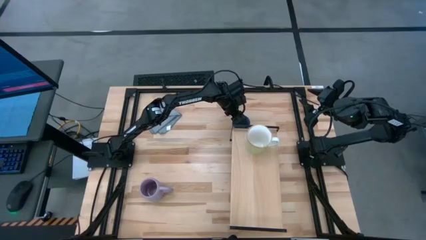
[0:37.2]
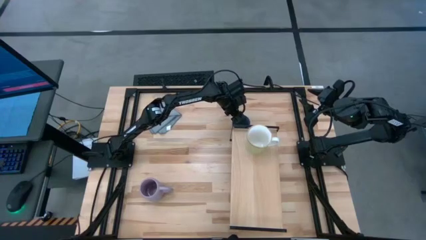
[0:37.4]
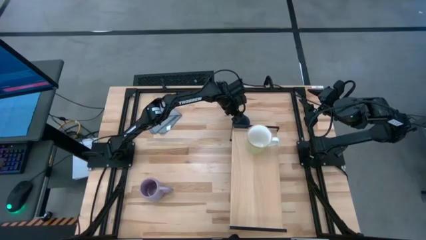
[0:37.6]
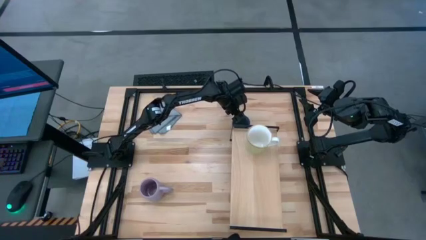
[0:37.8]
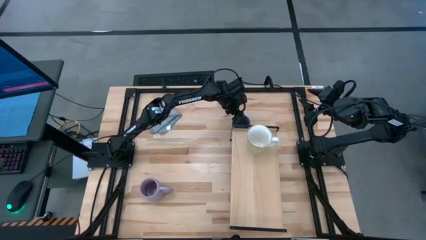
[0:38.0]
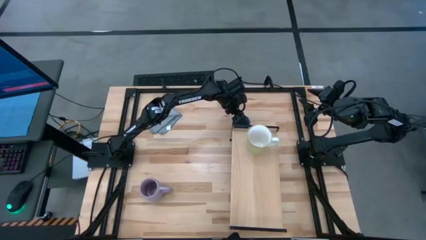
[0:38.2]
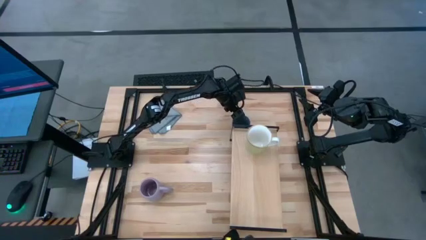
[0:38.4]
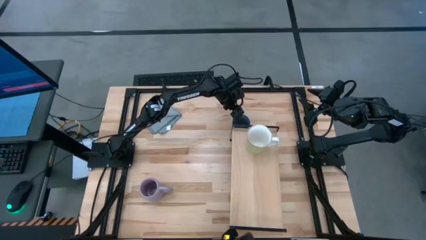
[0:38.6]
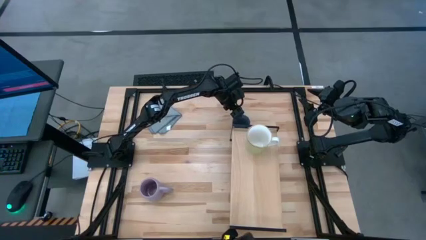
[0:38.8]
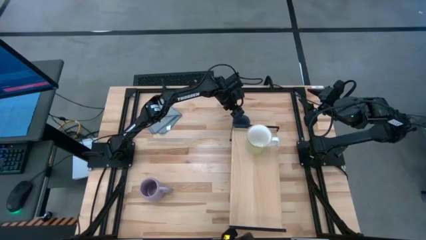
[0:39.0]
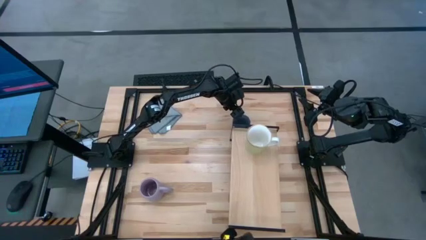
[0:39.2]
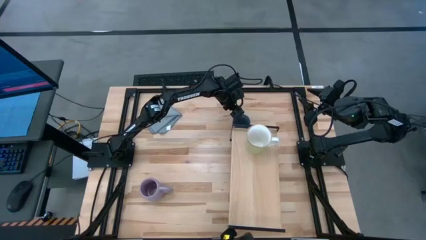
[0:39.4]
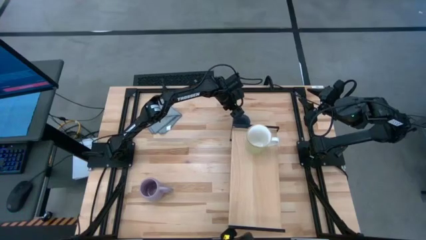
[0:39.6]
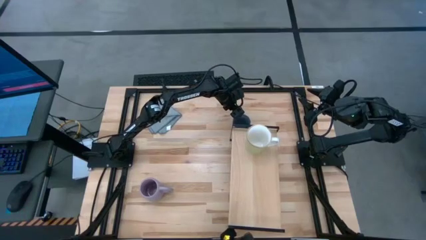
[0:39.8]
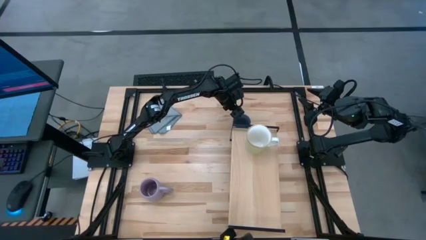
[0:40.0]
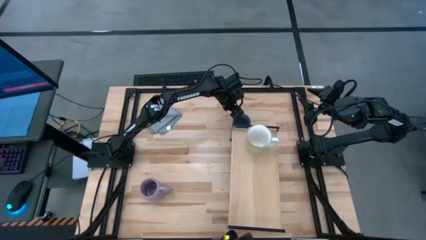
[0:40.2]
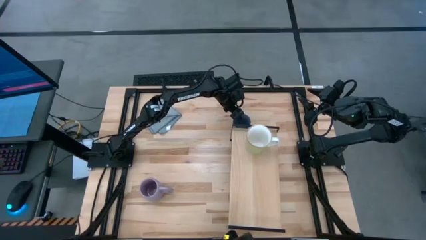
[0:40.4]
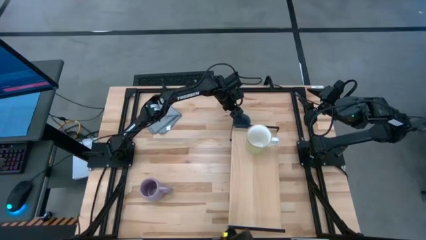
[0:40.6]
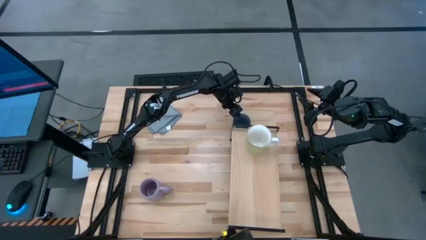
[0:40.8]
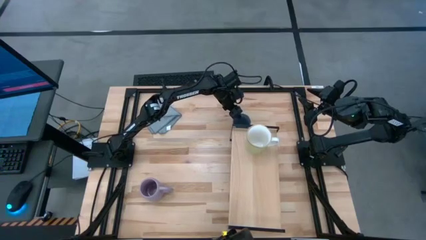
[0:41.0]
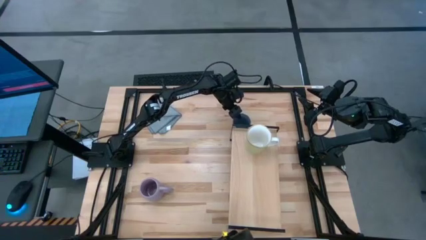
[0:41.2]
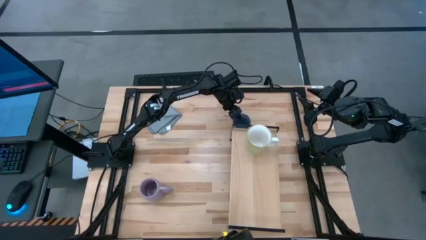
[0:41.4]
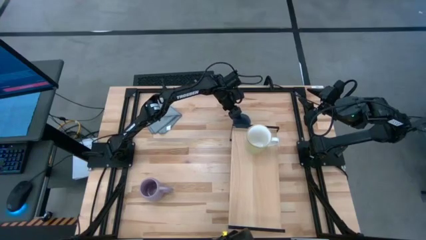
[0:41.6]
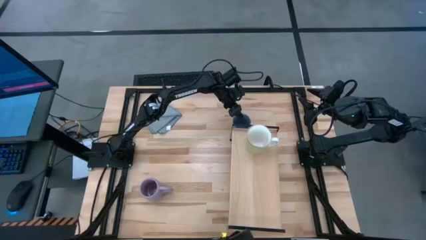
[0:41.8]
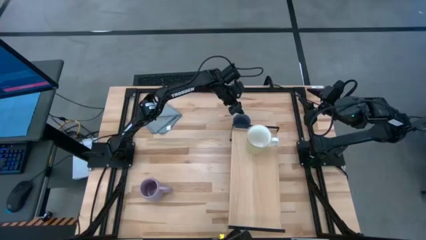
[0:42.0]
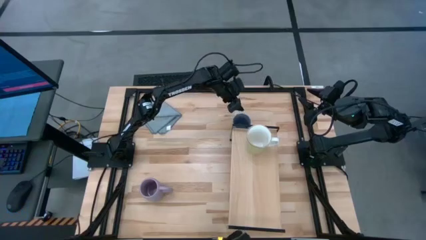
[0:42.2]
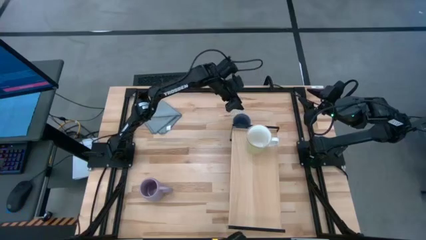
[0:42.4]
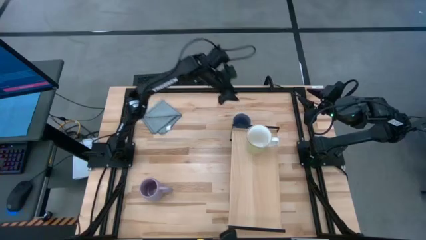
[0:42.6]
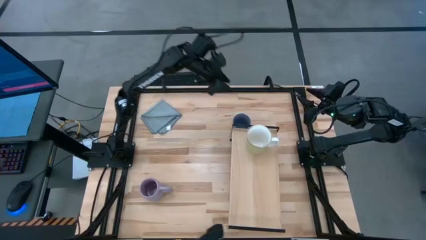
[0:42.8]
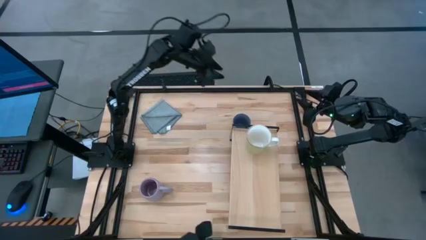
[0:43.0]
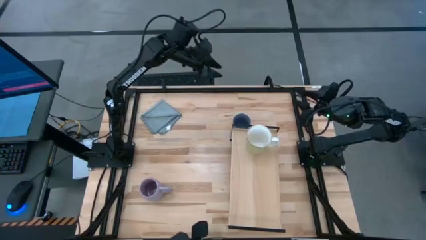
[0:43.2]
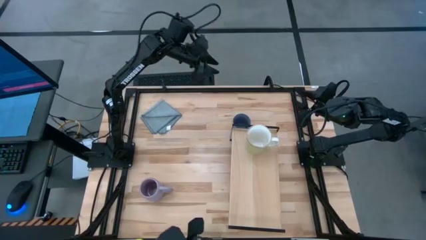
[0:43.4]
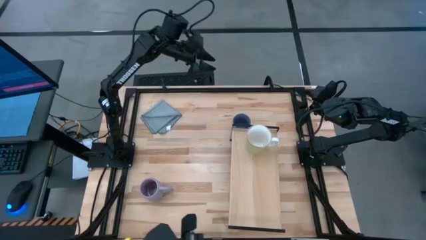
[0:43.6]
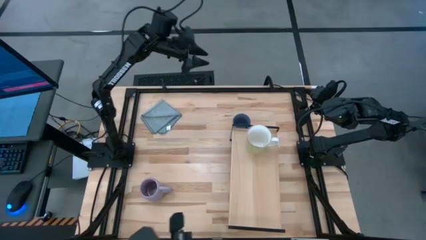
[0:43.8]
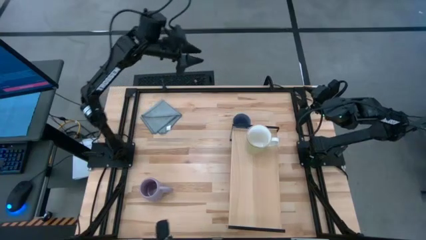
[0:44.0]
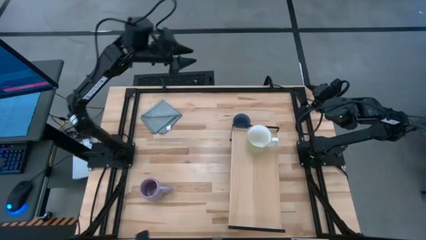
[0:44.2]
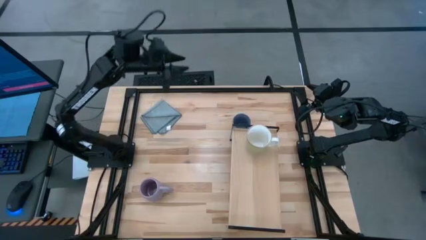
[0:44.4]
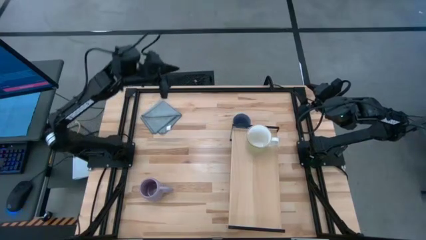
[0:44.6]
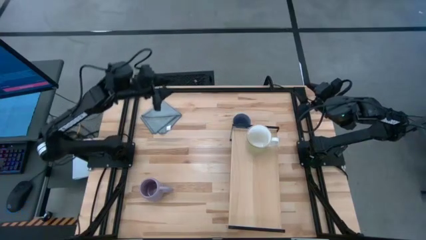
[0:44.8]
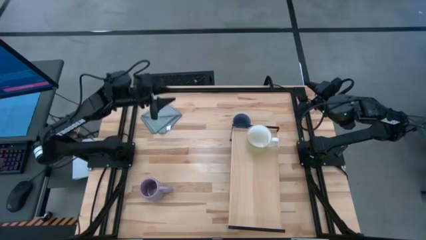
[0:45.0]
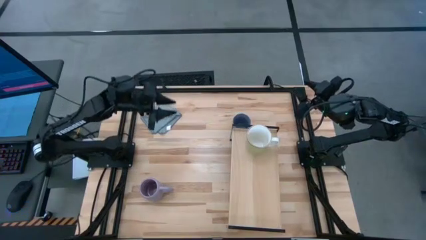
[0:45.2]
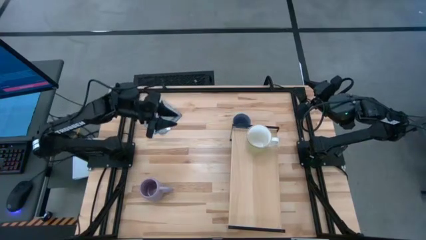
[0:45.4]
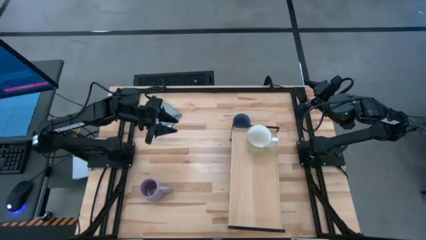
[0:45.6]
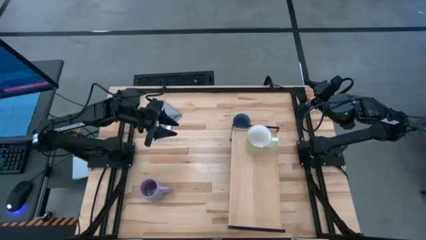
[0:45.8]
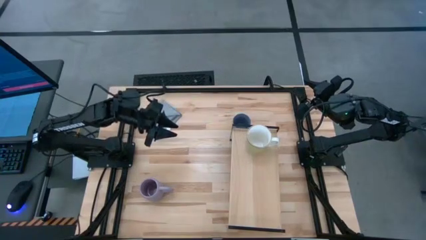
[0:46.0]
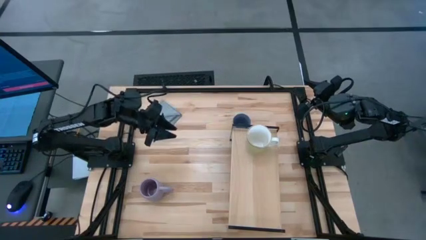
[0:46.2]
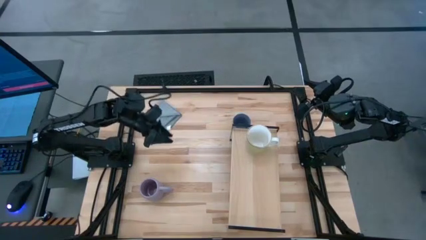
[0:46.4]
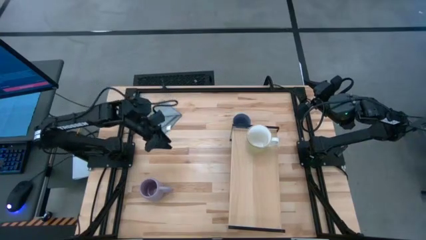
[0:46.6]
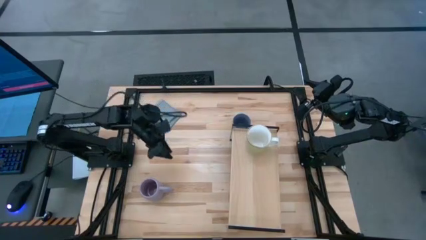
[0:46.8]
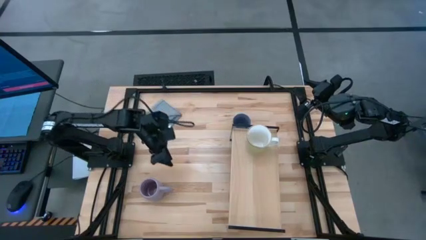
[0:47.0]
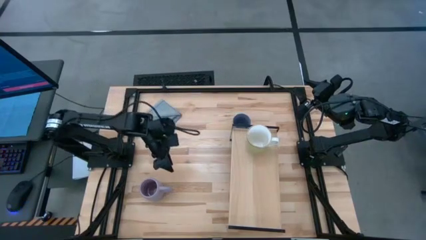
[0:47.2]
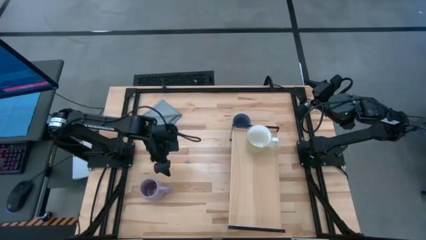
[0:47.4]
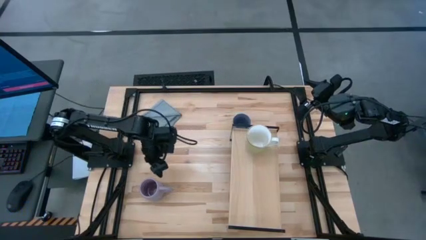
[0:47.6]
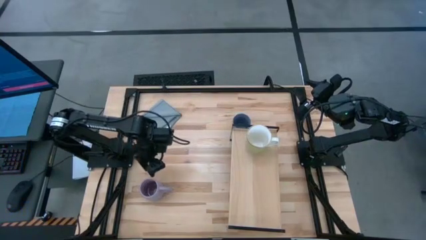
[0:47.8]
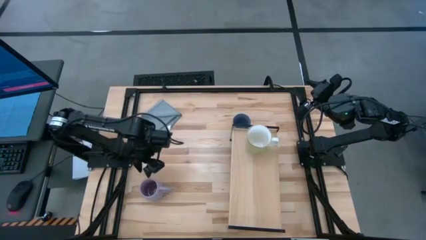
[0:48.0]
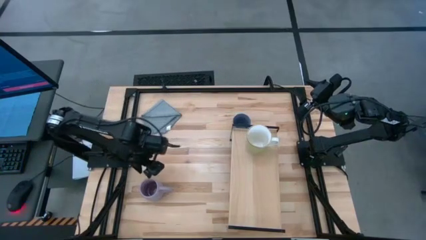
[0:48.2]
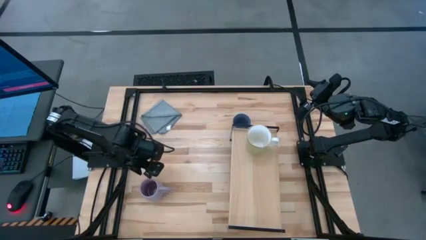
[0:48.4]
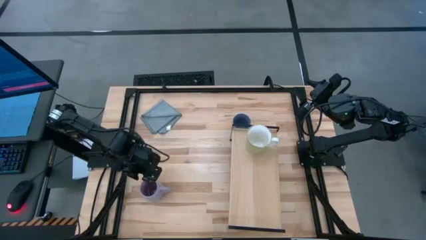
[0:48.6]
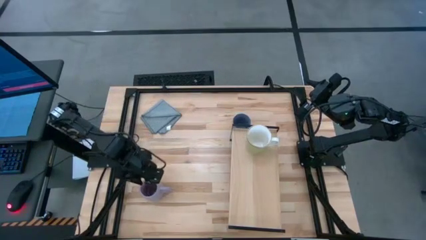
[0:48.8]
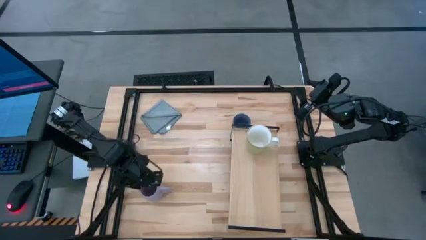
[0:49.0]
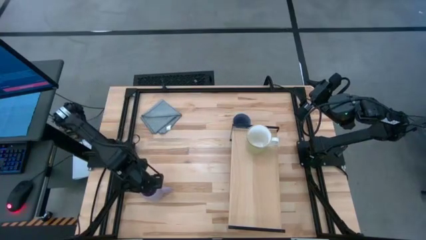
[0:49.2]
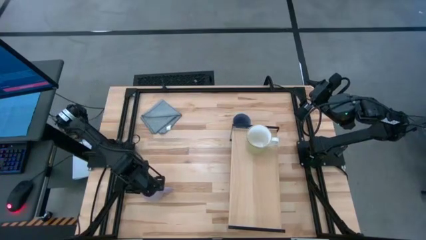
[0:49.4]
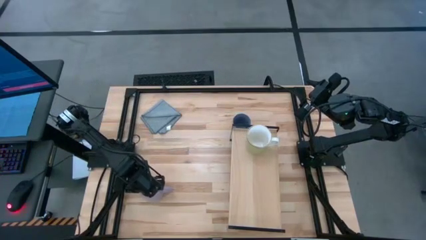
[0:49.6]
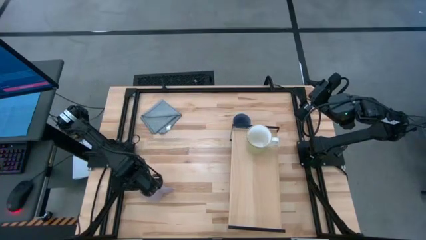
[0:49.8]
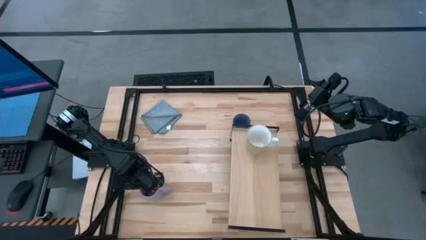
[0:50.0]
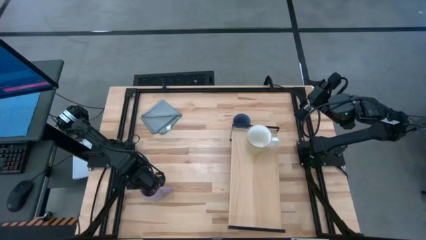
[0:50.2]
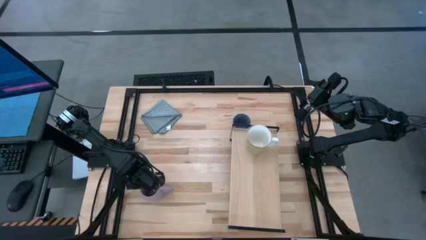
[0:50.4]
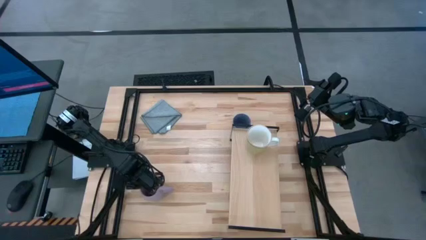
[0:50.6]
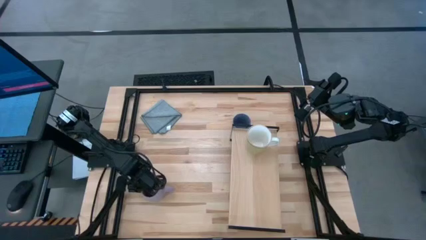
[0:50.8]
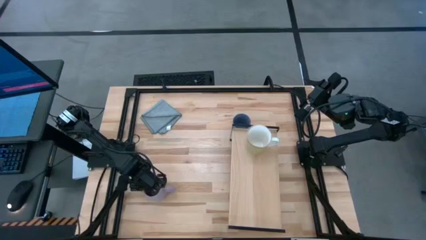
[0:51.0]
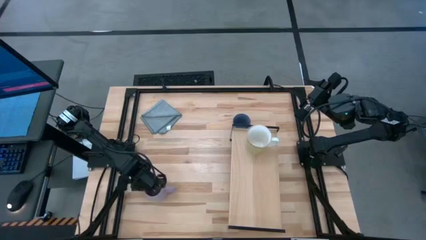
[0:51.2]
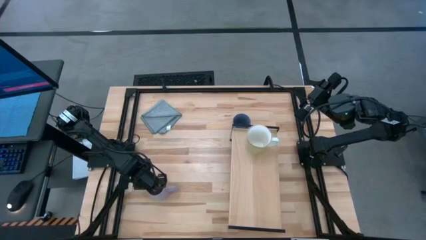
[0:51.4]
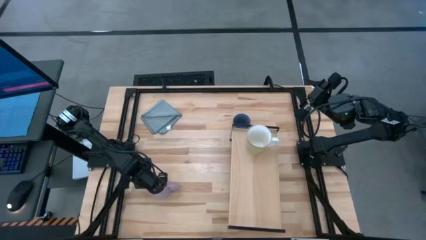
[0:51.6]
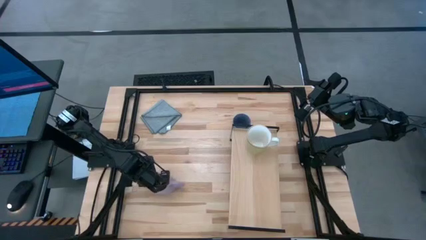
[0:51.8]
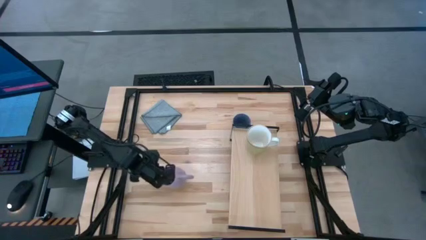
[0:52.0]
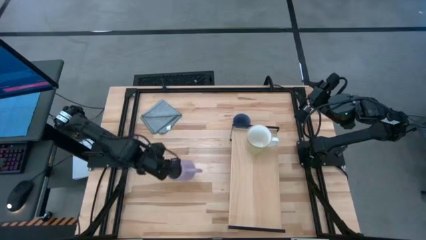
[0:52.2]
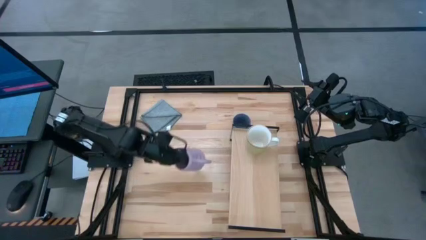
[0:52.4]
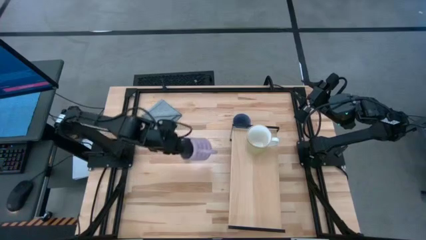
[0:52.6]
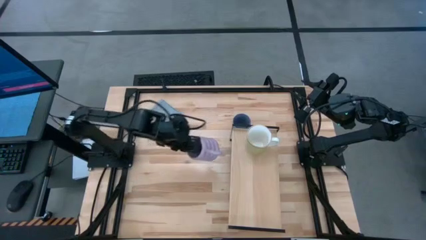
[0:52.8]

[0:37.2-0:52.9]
Task: Stack small to large cups/mugs on shelf
Put the violet mug on the shelf

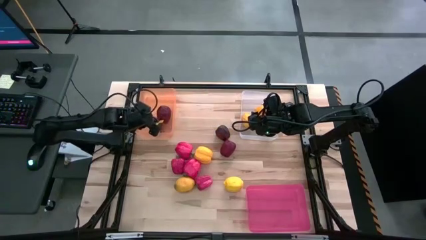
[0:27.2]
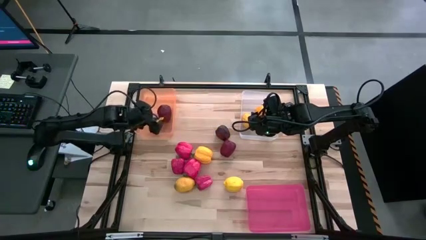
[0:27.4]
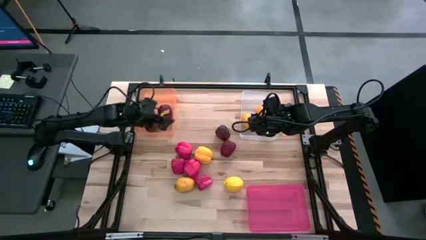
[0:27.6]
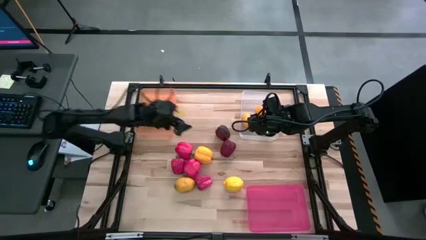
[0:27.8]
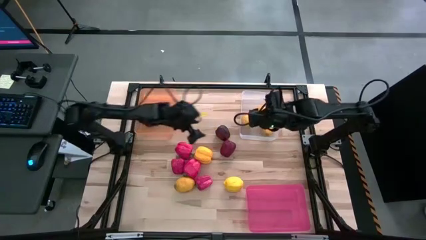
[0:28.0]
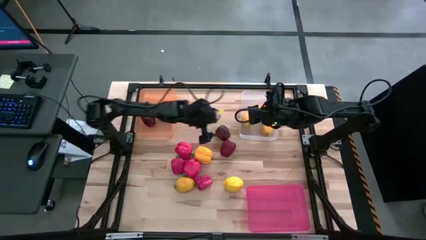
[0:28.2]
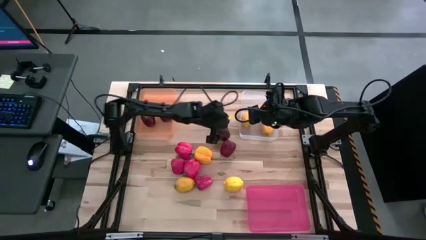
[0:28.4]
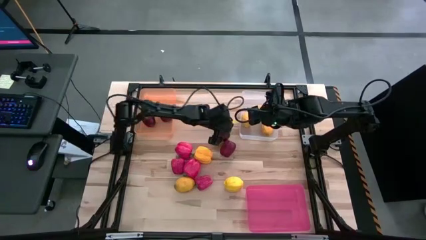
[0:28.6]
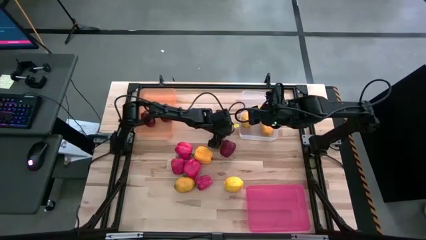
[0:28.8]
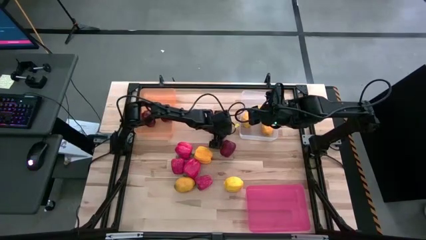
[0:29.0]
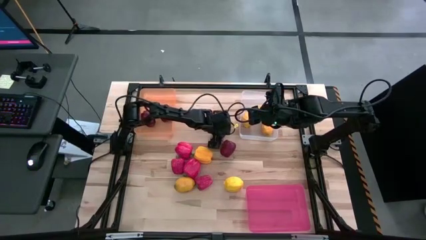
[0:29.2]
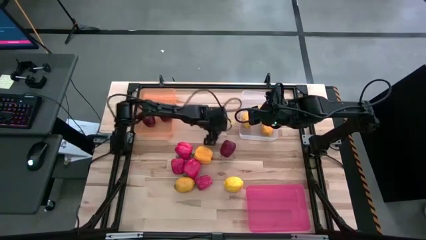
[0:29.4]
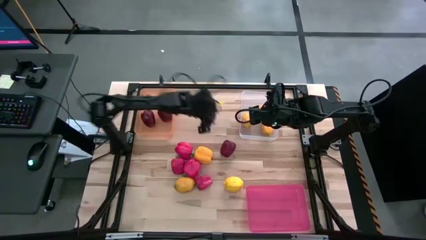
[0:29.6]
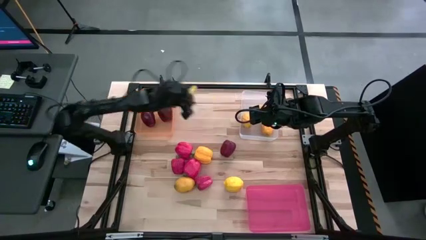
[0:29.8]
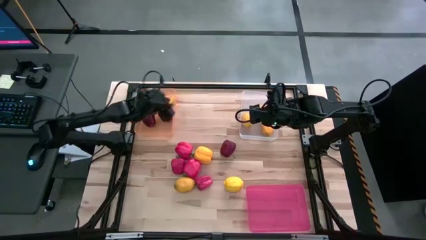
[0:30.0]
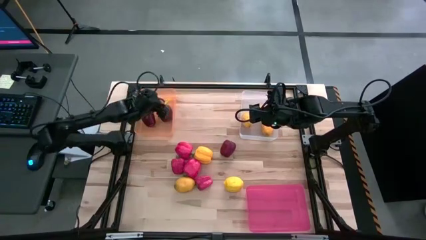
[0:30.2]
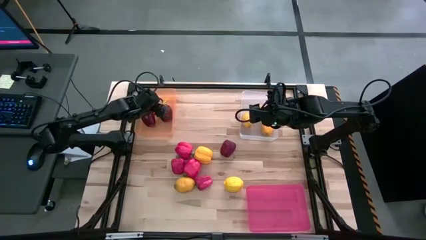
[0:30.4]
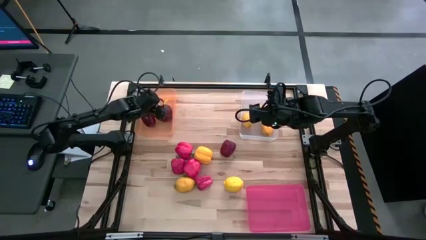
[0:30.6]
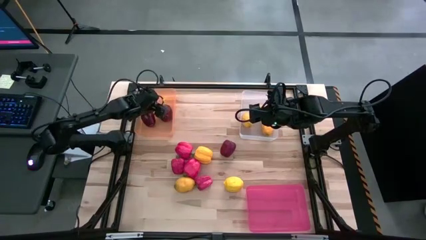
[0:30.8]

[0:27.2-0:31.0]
Task: Sort produce into baskets
Put the apple into the orange bin
